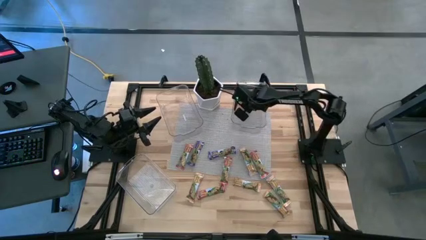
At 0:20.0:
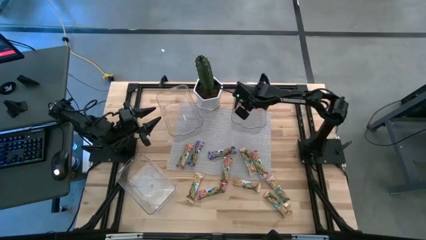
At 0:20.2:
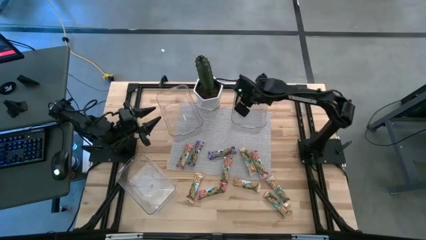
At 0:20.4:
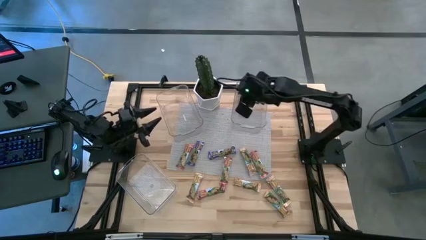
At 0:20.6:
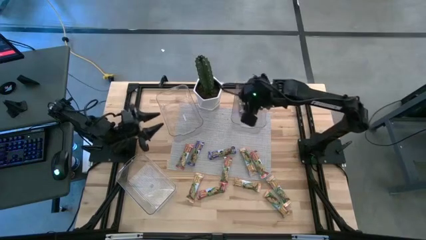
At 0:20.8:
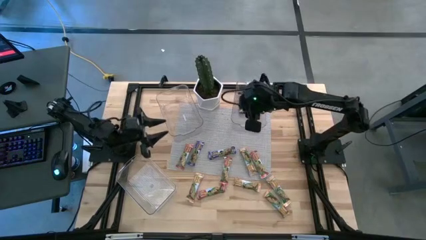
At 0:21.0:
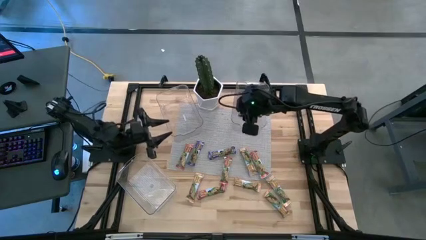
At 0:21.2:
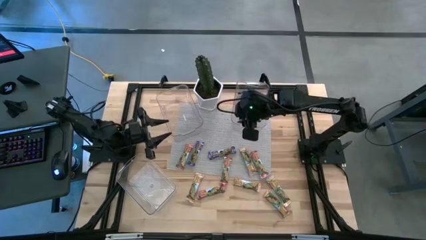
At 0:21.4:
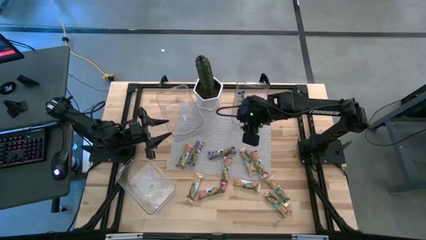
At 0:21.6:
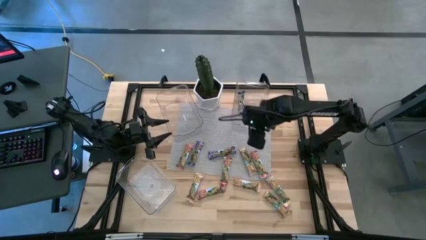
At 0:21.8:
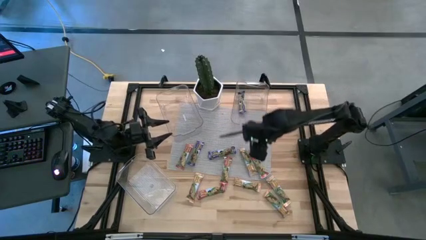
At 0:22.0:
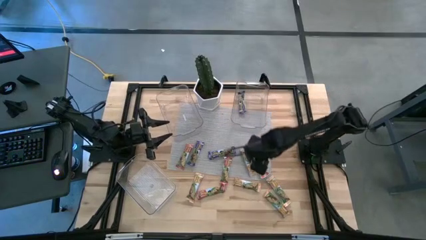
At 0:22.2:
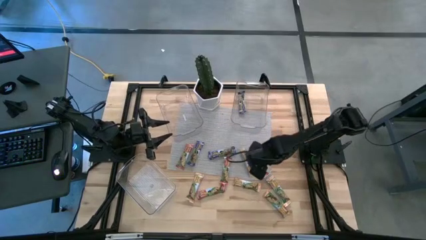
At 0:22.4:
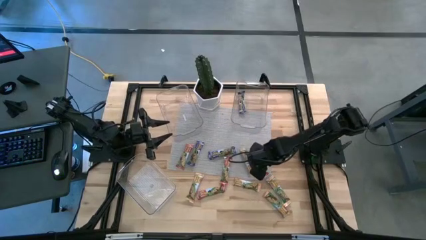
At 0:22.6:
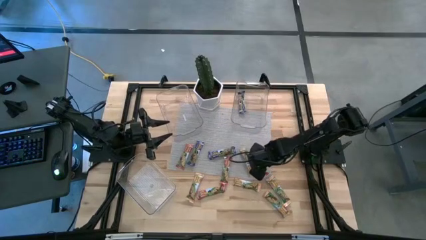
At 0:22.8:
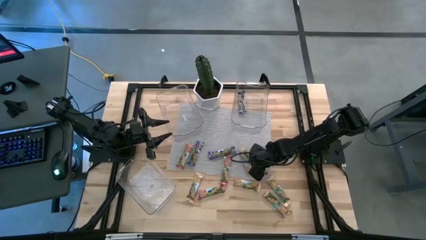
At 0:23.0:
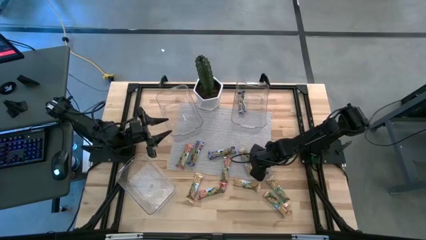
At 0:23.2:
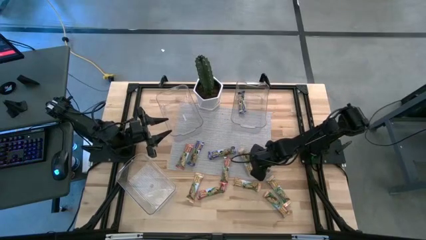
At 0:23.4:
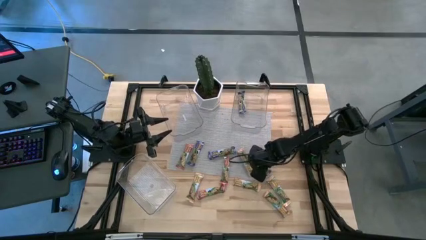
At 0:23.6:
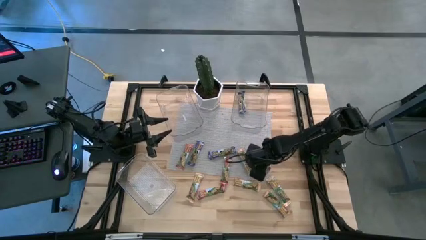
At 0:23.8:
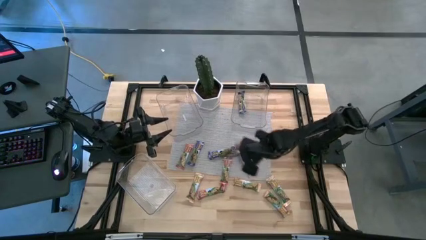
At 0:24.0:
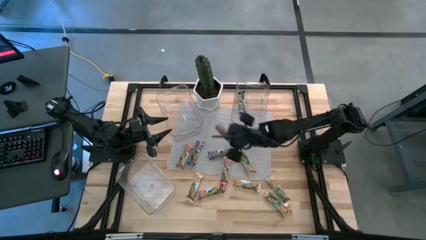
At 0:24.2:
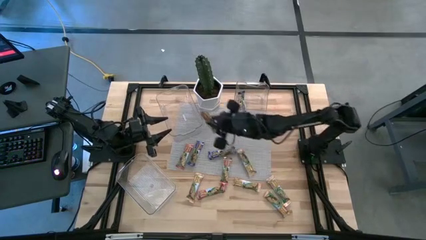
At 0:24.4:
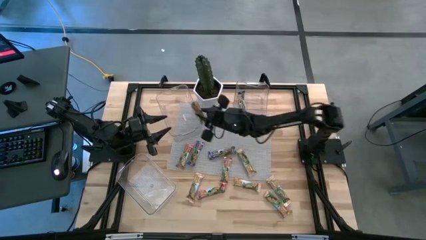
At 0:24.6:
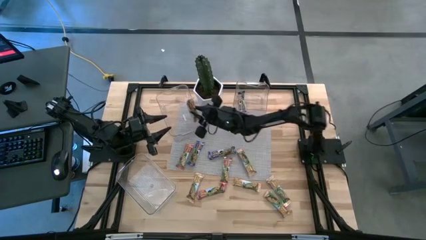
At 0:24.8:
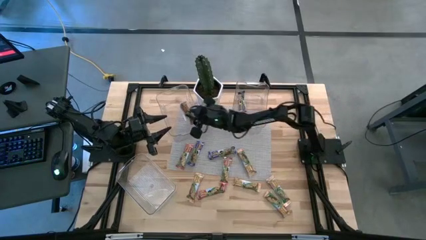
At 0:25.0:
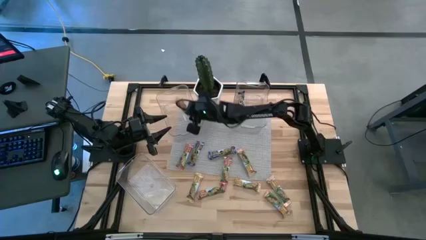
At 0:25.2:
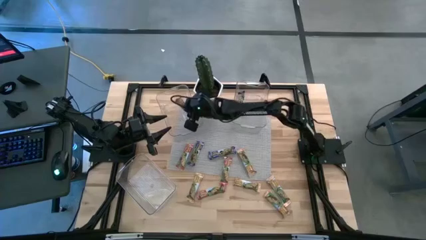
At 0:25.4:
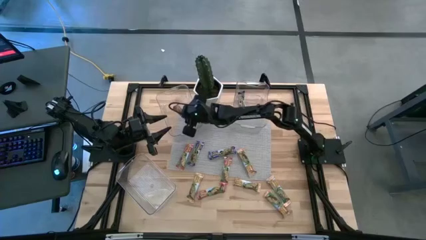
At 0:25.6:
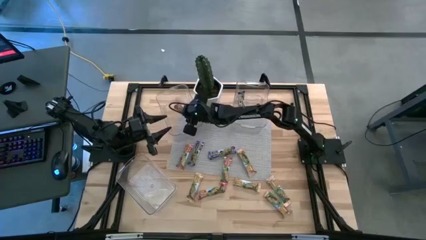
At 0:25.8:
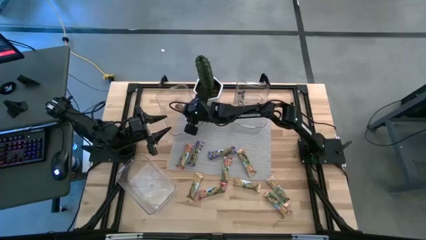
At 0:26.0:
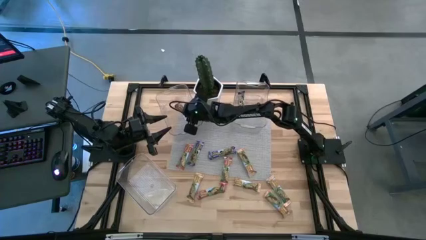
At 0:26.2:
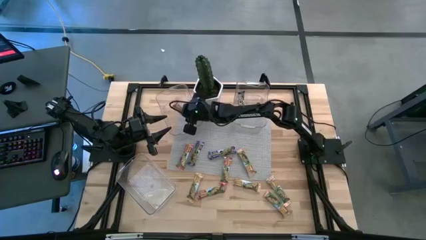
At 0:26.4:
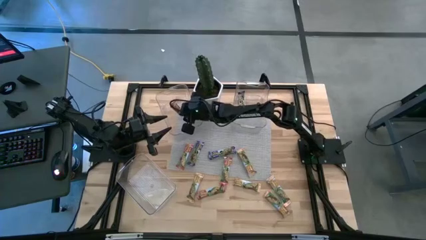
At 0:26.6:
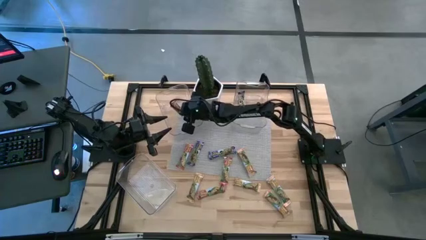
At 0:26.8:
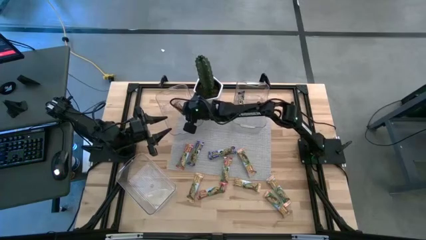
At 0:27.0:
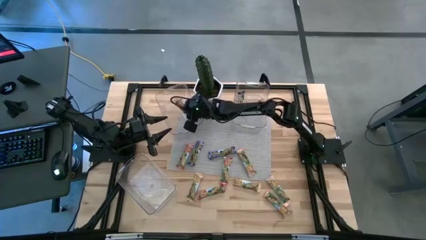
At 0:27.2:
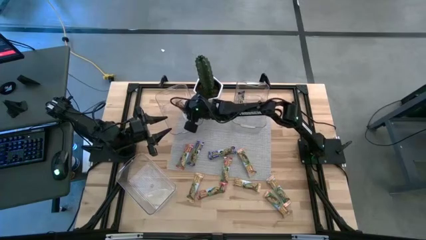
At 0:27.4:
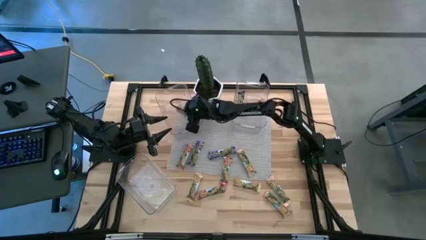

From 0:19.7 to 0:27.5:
Task: Pick and place Granola Bars by type
Put the red granola bar into the top left transparent bin

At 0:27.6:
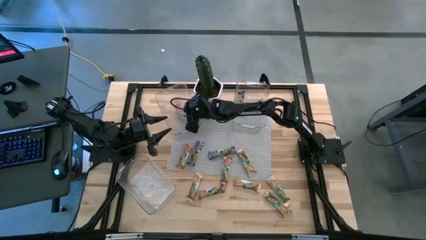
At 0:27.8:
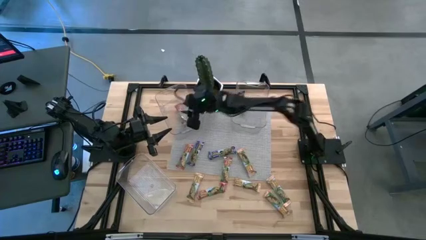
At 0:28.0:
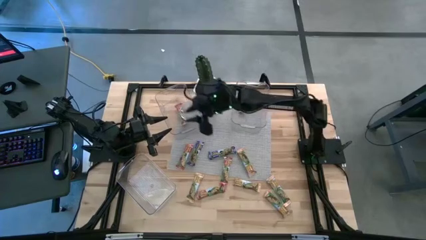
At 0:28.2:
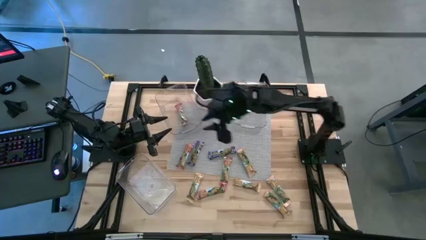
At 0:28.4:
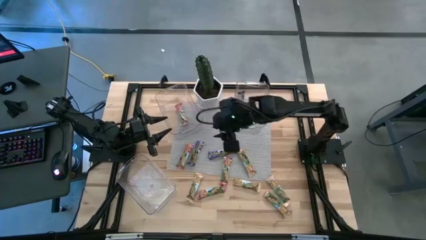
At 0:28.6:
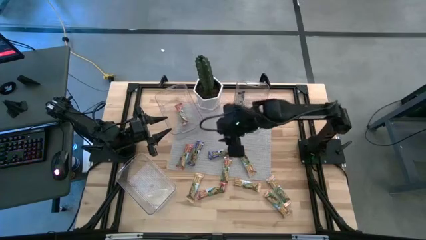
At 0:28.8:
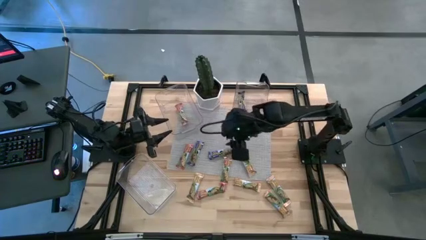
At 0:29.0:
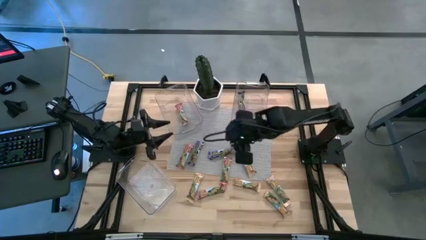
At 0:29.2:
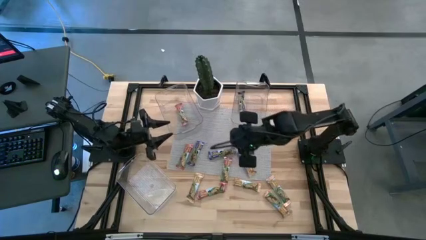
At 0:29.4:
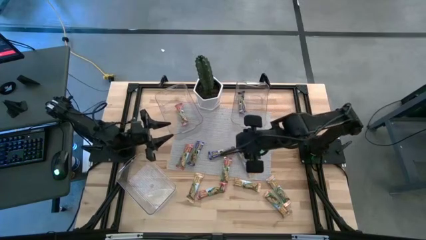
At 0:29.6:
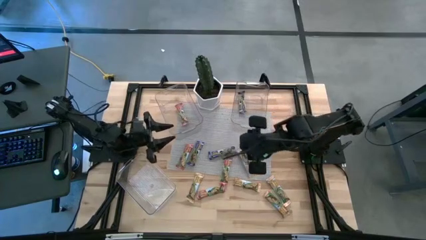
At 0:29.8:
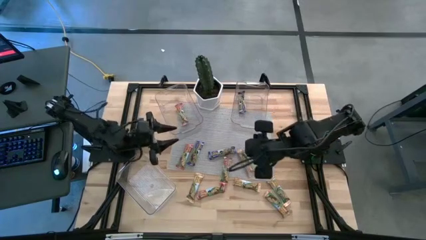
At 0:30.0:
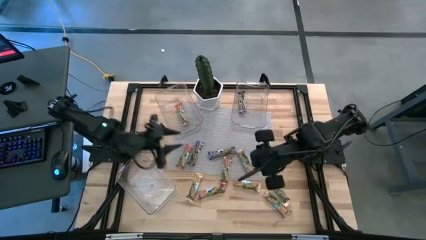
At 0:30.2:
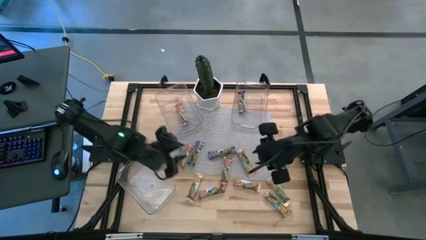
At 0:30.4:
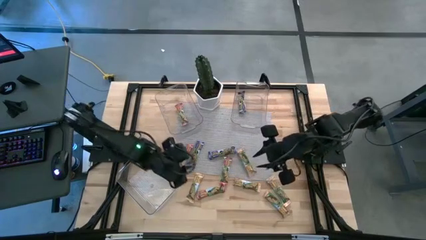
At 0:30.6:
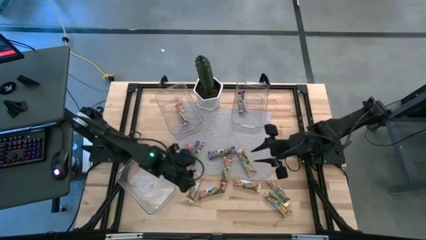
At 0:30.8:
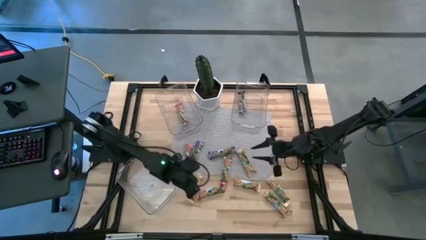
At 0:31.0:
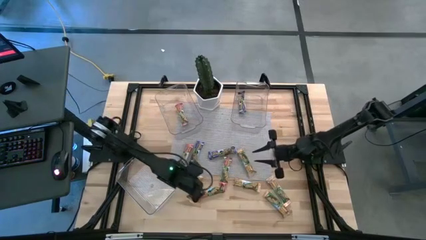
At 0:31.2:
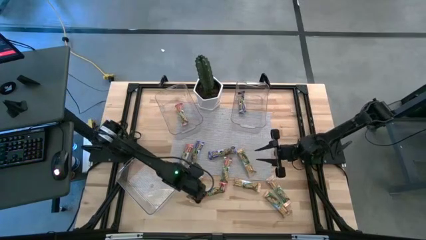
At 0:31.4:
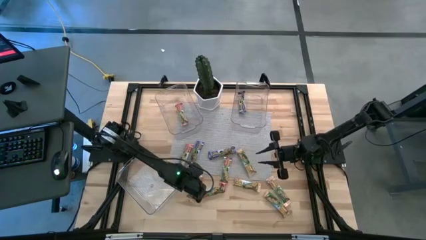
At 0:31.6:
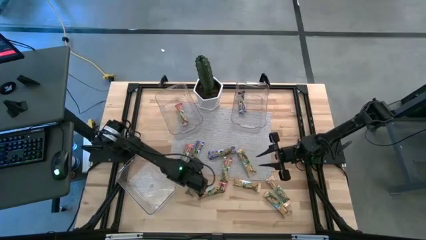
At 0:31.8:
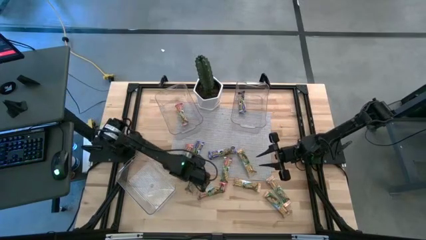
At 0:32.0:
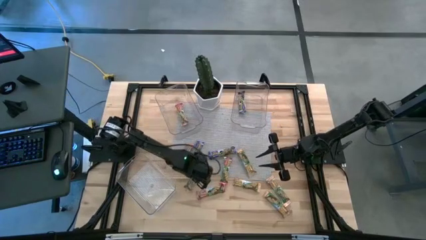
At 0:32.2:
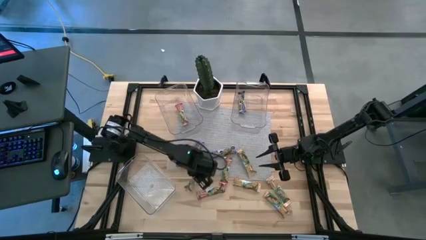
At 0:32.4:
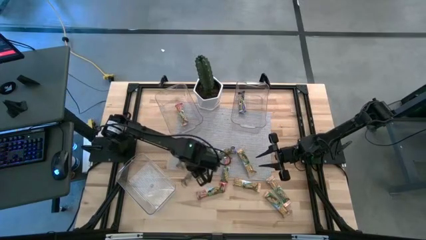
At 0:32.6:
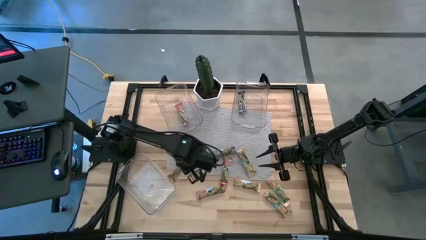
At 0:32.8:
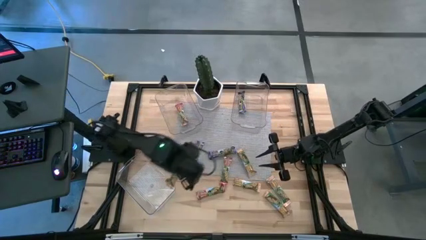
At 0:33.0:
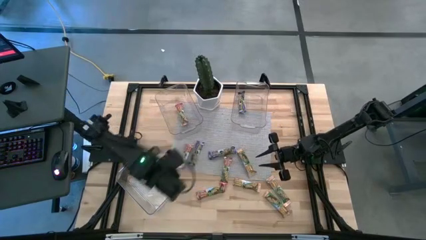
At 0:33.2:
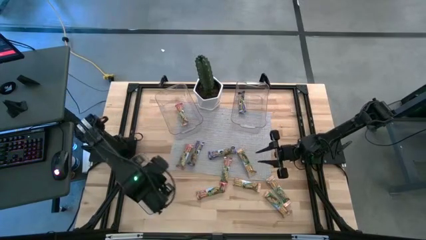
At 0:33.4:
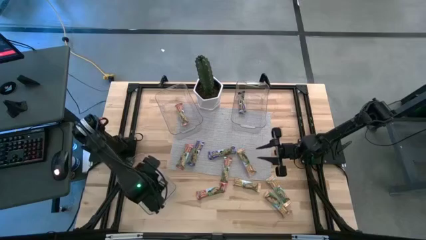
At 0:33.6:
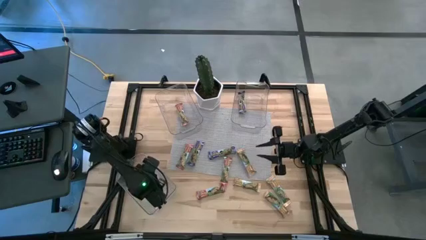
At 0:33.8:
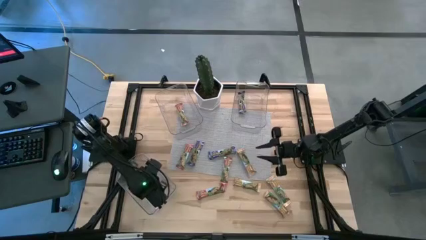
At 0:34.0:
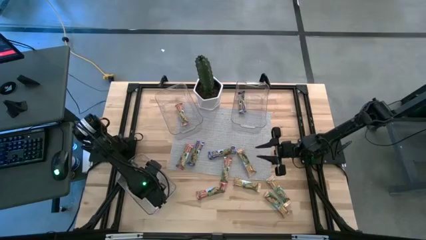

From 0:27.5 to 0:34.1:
Put the yellow granola bar into the bottom transparent bin

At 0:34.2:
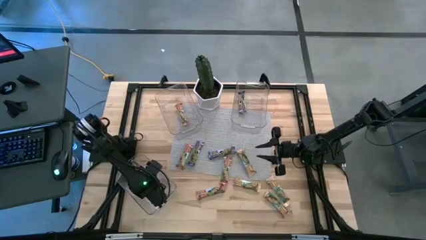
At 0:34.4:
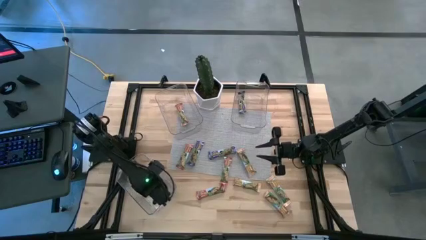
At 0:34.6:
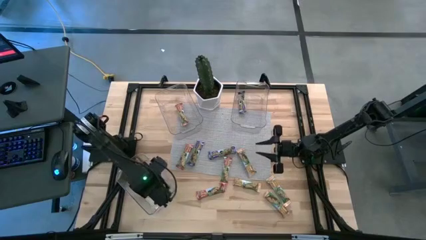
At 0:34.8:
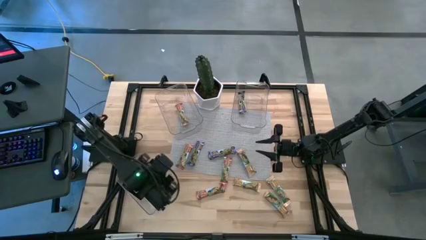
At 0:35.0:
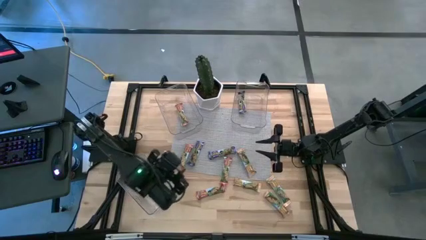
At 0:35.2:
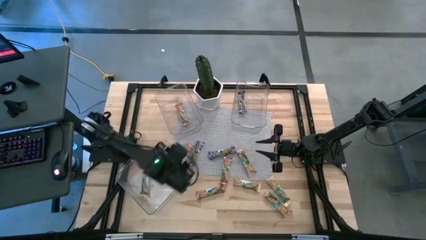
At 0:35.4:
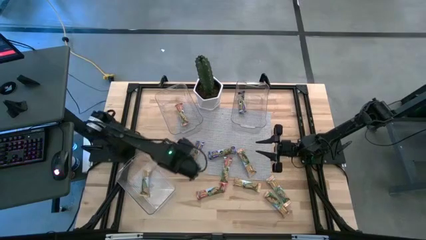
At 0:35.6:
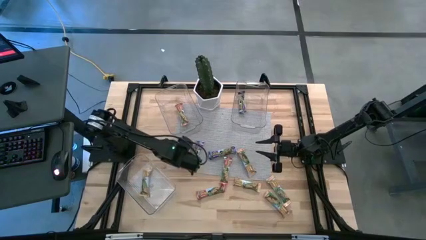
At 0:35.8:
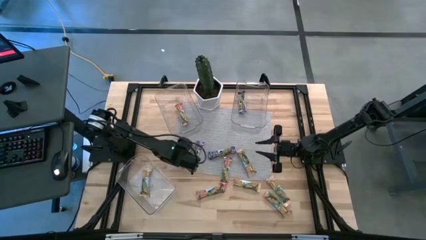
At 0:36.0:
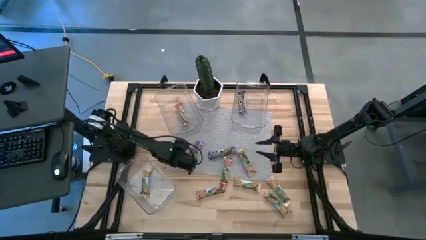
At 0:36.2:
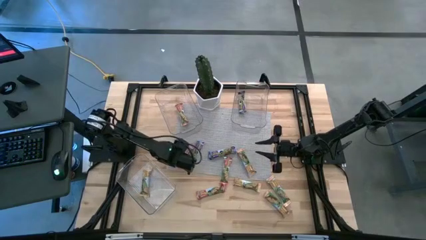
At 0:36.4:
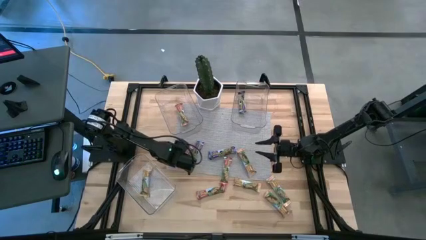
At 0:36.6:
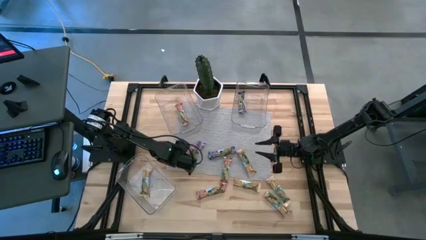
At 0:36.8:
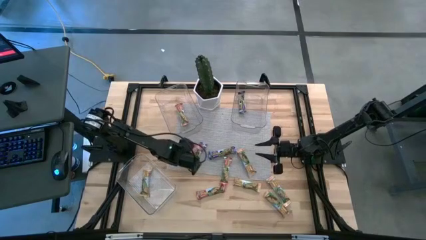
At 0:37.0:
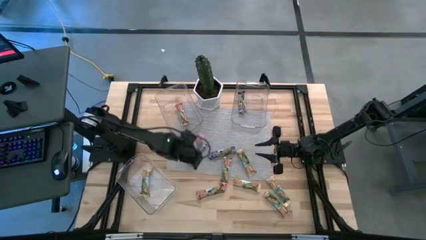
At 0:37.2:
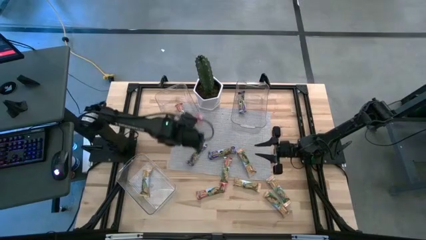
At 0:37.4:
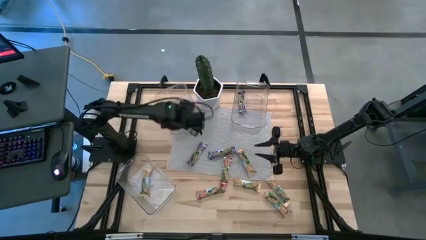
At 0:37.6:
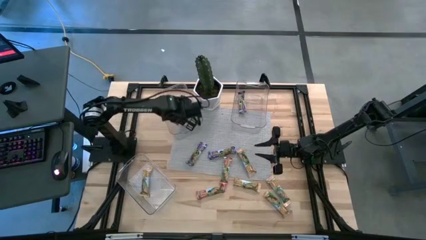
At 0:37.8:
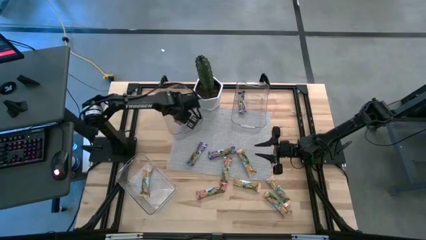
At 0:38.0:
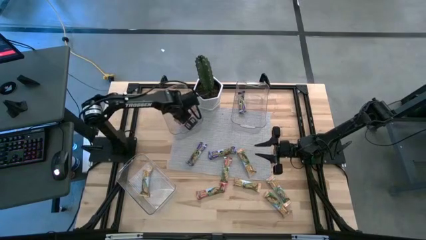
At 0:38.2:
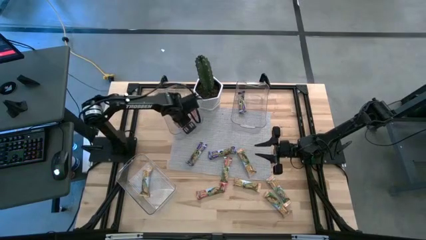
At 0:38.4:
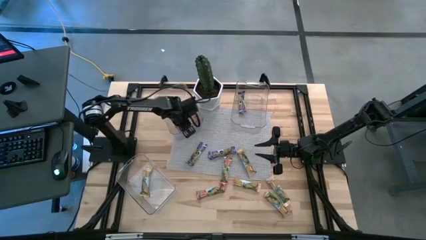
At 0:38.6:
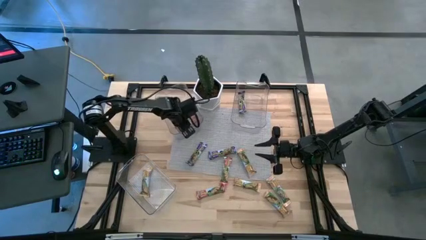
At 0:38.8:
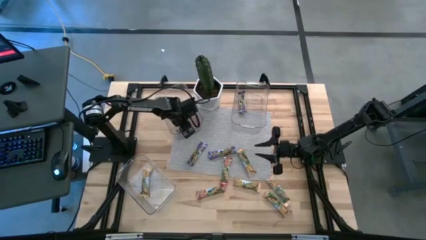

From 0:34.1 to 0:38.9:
Put the red granola bar into the top left transparent bin
